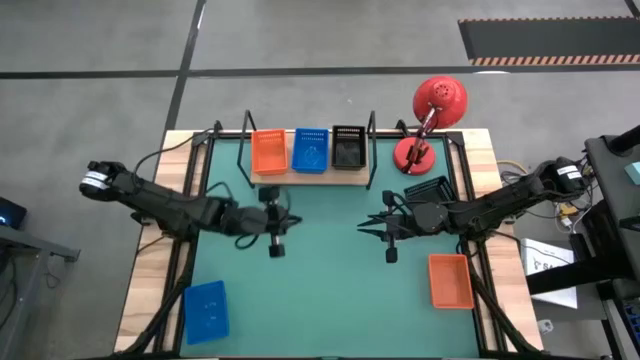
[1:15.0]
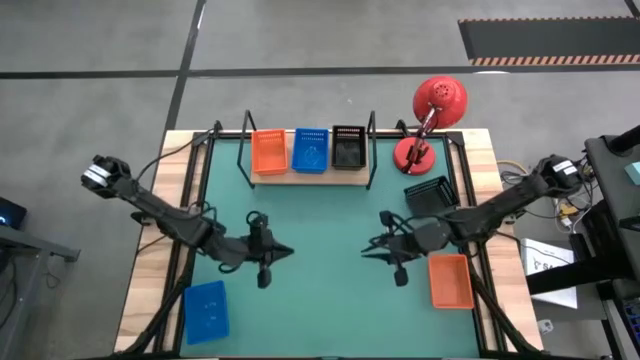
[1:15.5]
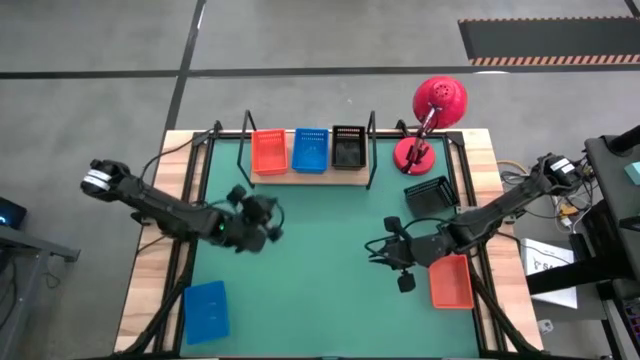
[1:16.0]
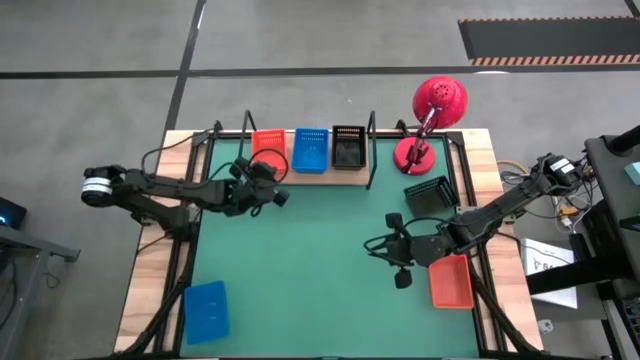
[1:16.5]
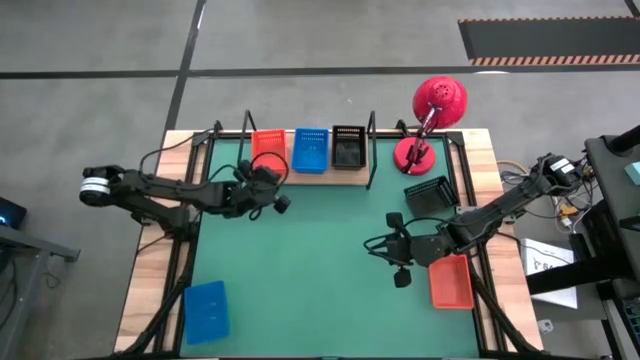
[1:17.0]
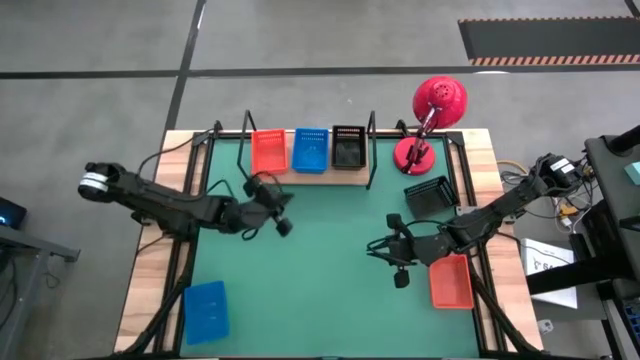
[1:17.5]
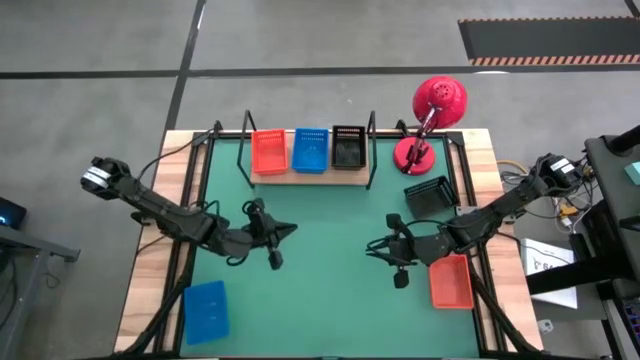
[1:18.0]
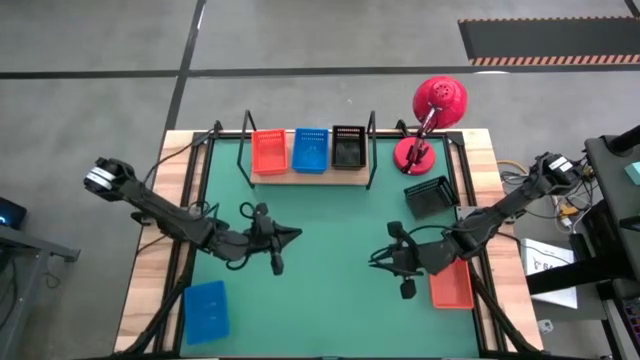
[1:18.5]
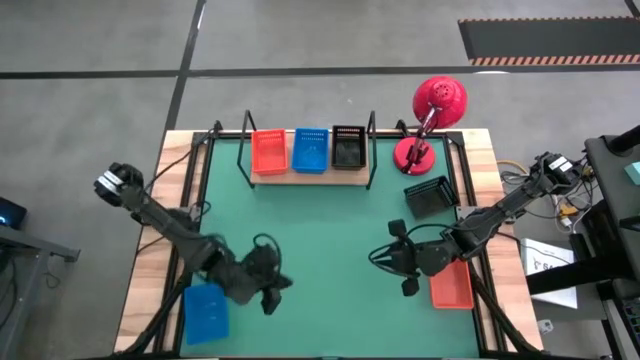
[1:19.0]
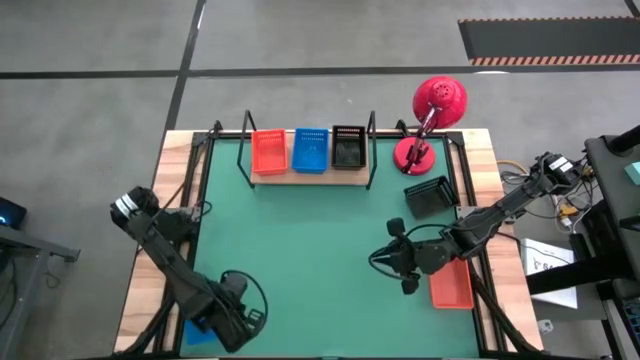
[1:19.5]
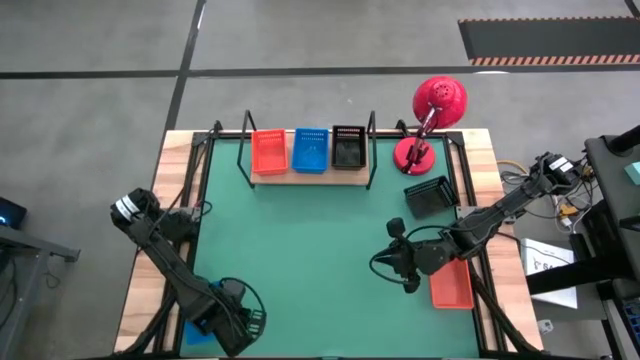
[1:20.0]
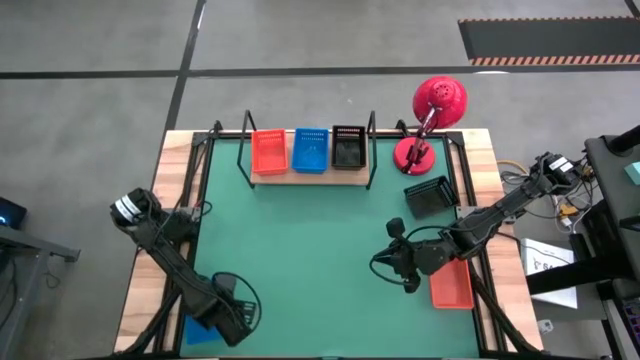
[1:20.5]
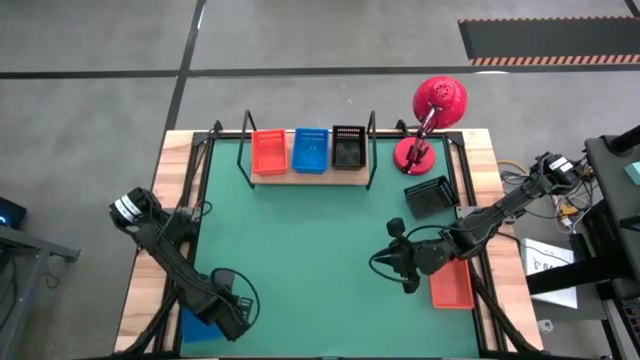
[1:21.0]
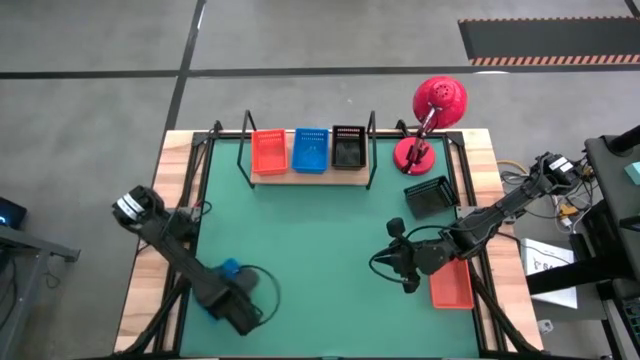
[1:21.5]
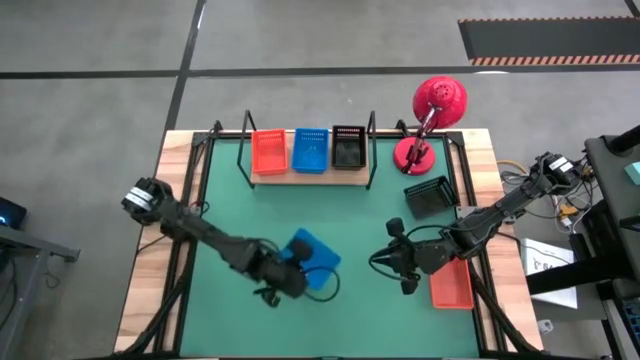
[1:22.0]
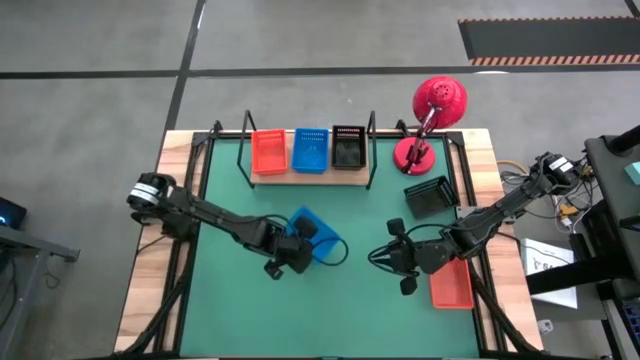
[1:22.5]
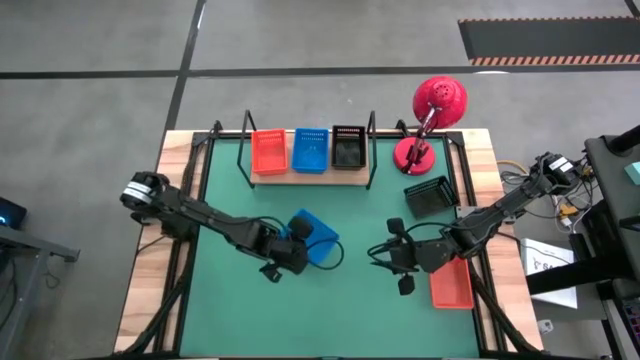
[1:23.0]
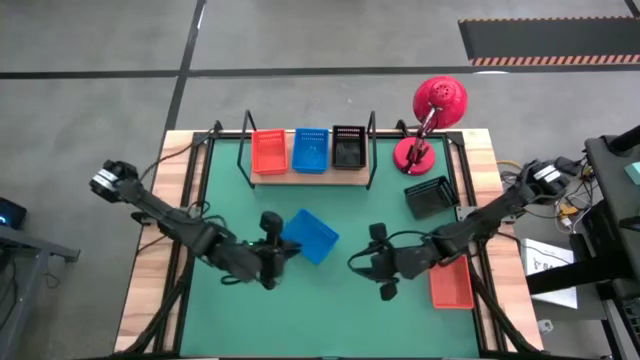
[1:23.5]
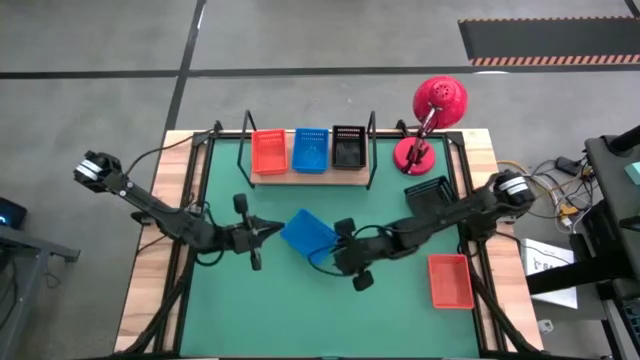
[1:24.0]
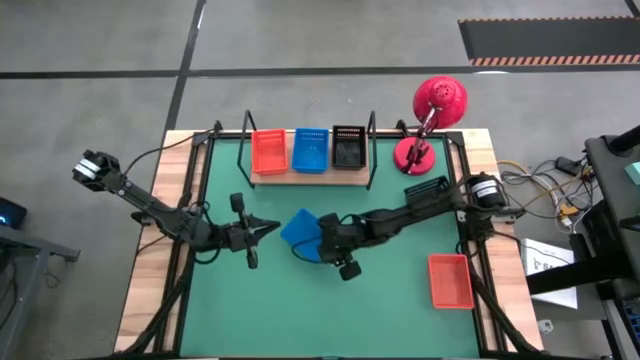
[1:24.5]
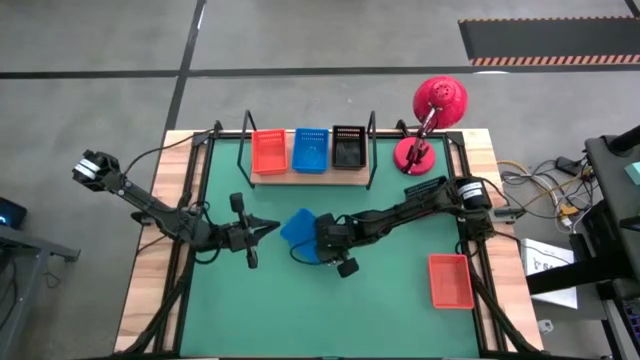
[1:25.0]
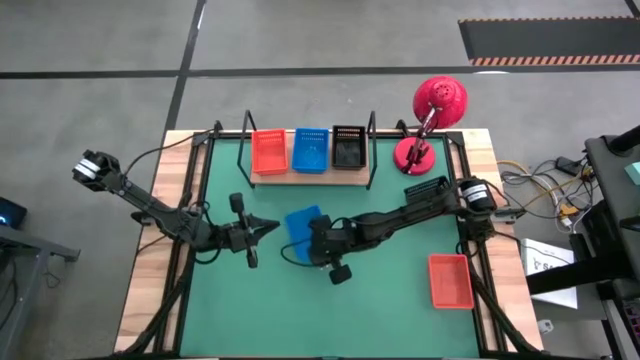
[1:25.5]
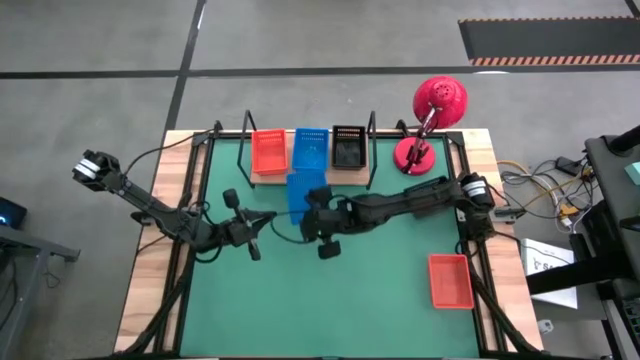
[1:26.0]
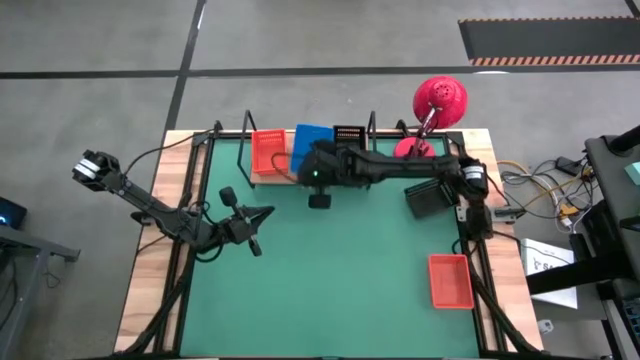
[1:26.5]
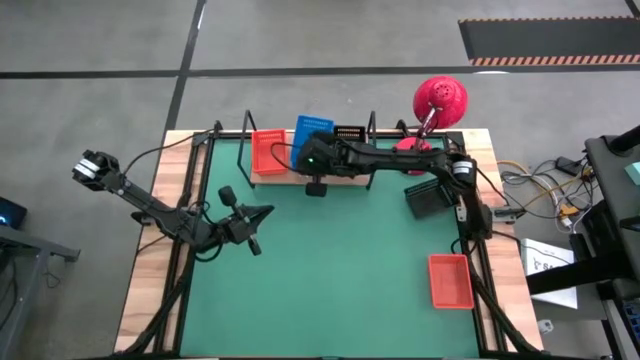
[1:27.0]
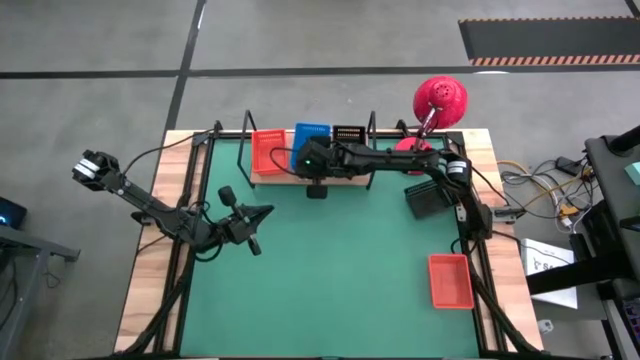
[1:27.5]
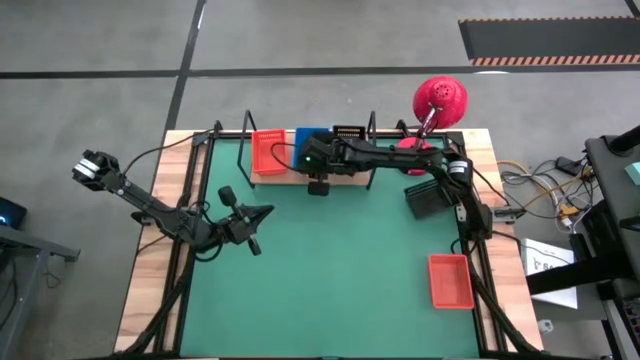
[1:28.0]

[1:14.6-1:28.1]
Task: Stack baskets on shelf by color
Stack the blue basket on top of the blue baskets on the shelf

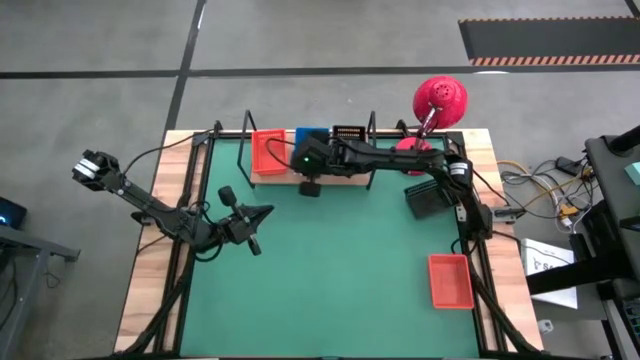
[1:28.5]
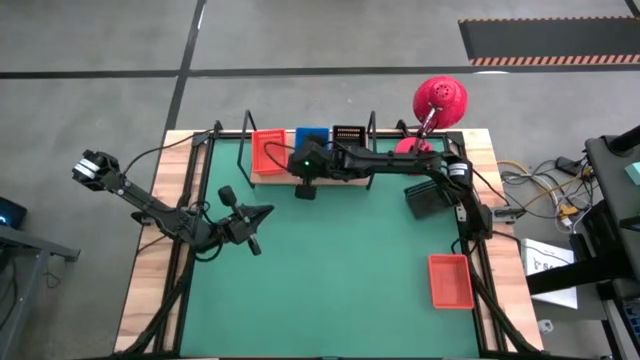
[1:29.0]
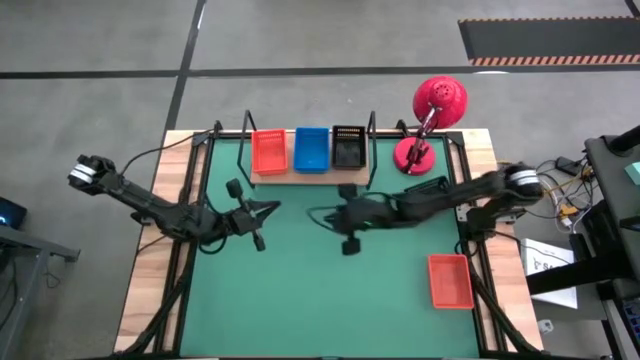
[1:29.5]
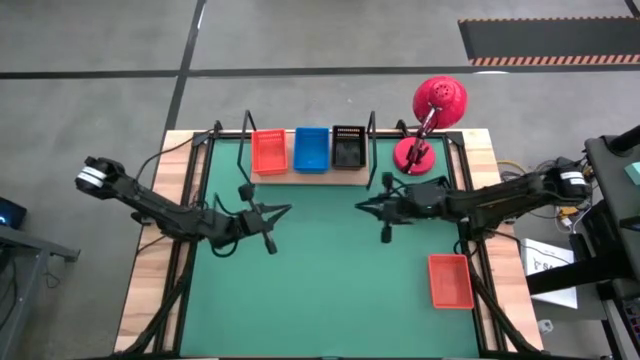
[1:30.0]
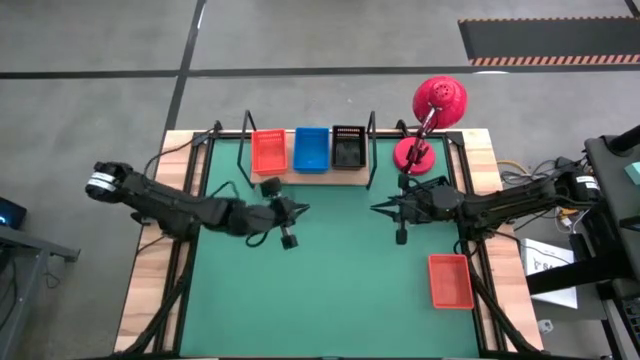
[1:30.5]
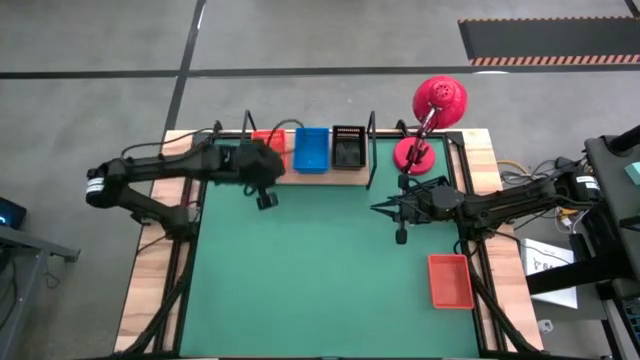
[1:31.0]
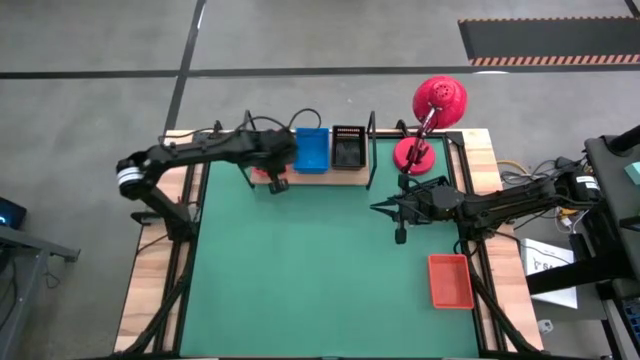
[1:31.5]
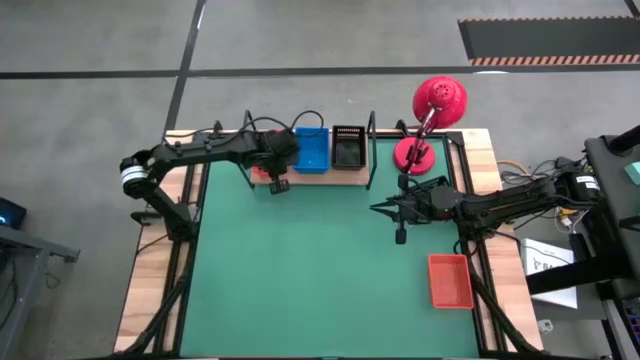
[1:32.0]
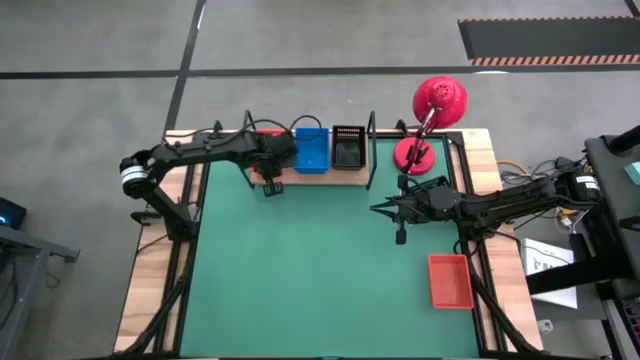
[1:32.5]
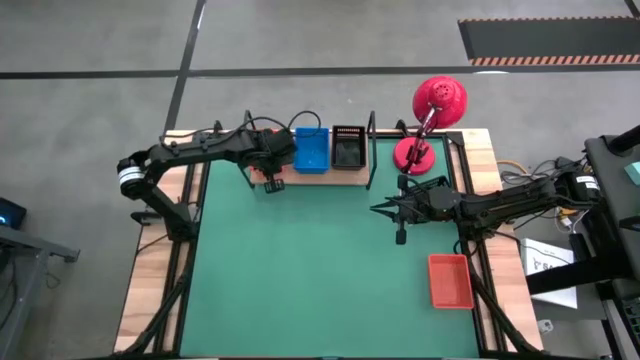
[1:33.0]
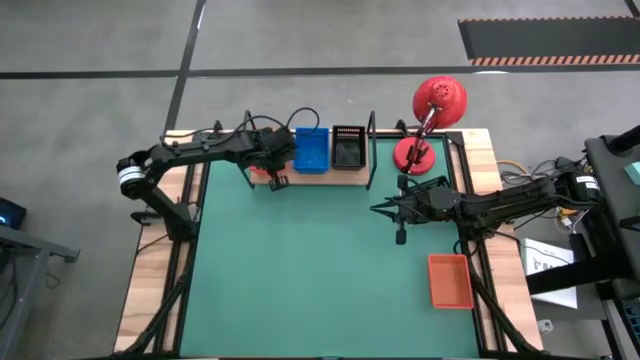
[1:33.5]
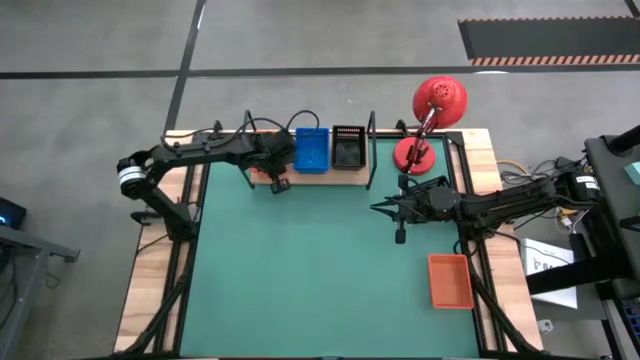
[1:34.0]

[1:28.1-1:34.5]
Adjust the orange baskets on the shelf

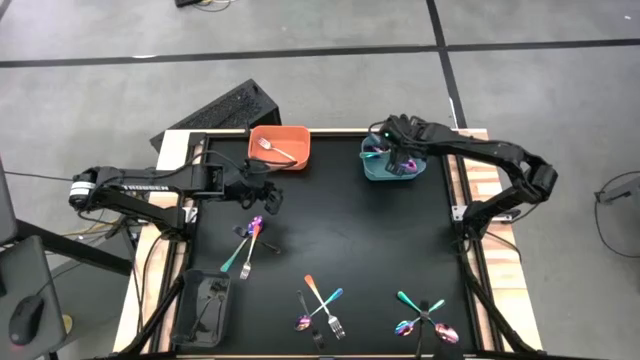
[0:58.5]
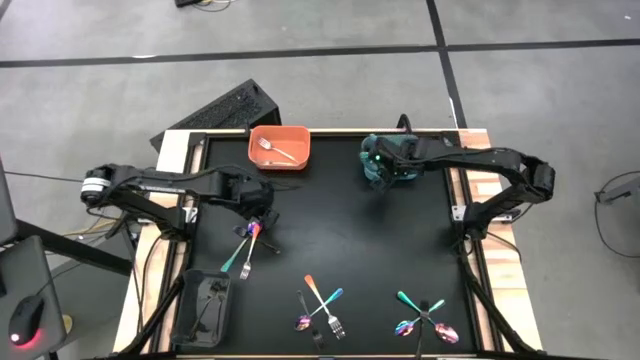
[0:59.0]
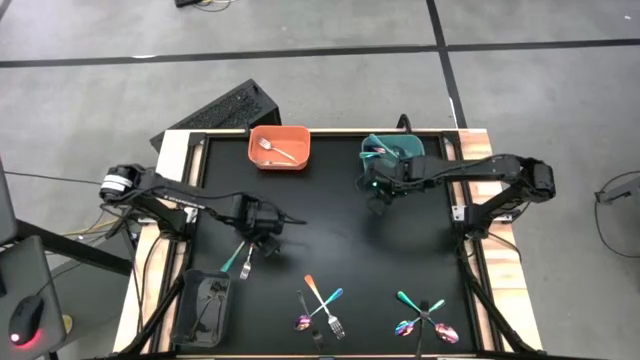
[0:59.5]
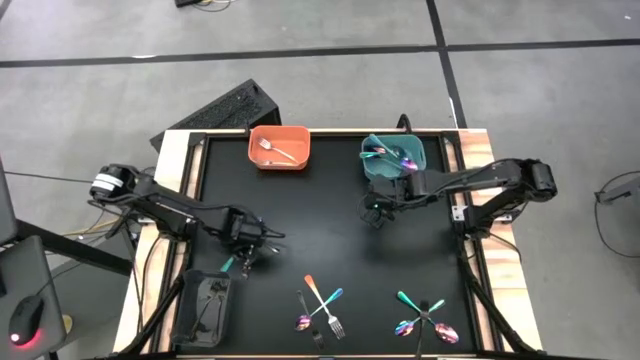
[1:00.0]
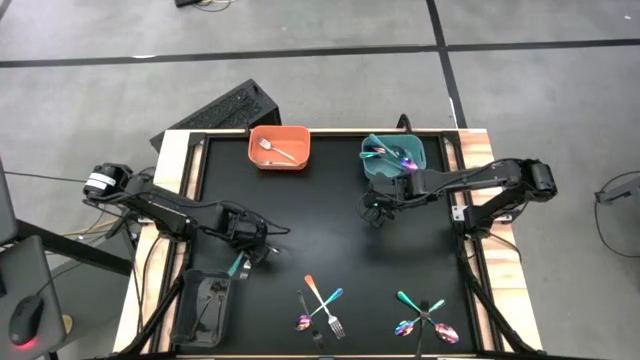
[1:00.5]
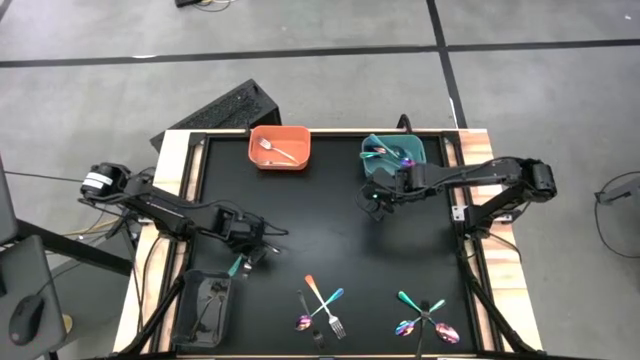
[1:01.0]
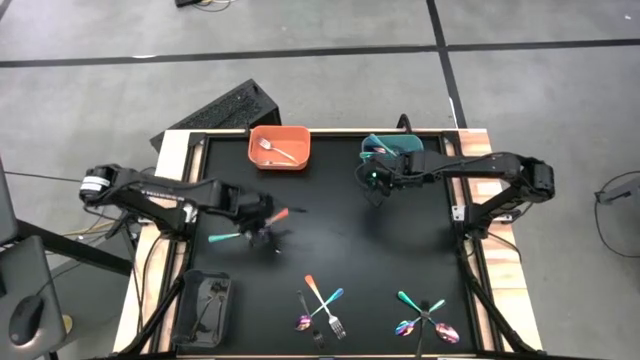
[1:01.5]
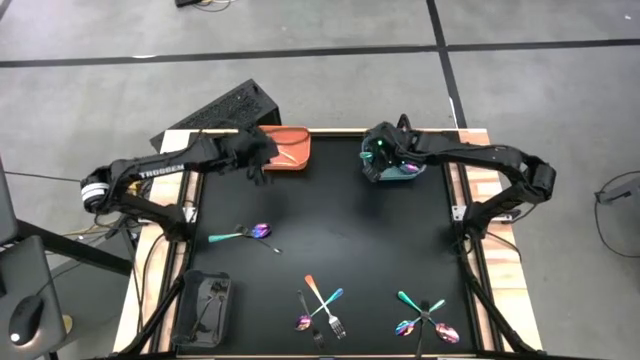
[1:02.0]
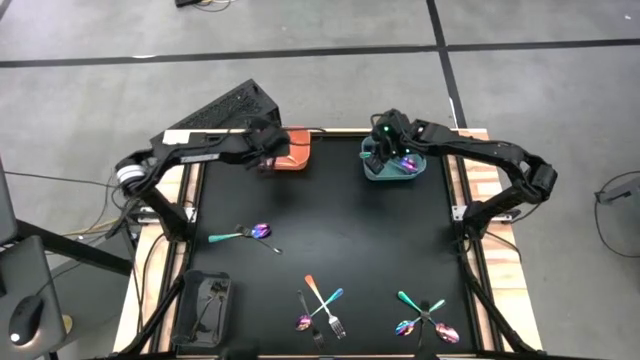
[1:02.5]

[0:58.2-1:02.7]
Task: Sort silverware by color (type)
Put the orange fork into the orange bin
